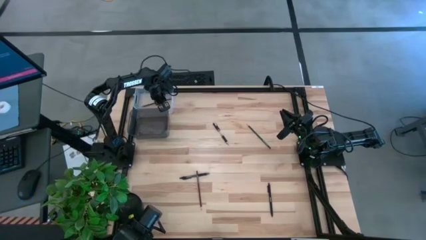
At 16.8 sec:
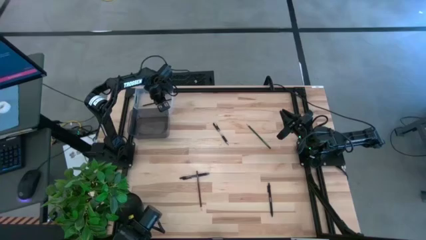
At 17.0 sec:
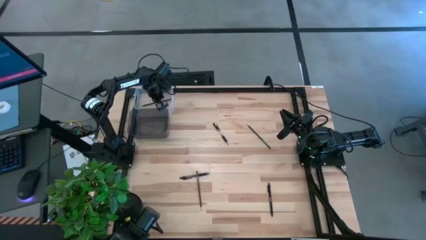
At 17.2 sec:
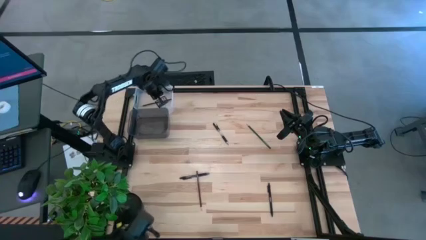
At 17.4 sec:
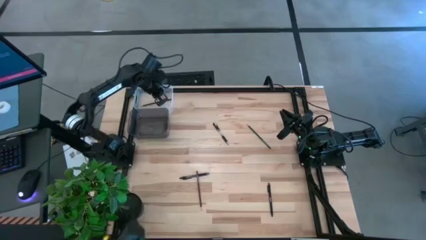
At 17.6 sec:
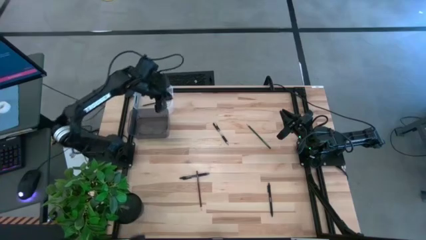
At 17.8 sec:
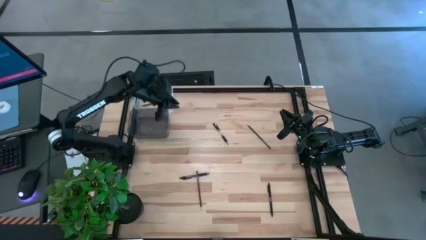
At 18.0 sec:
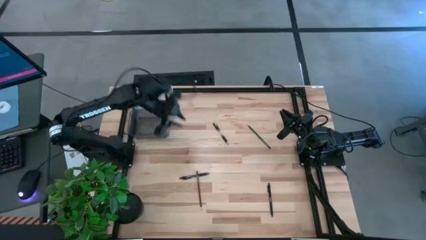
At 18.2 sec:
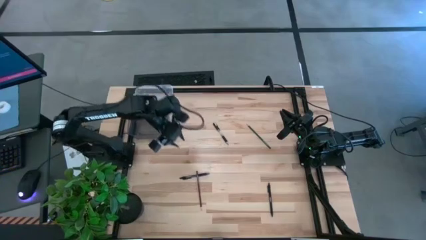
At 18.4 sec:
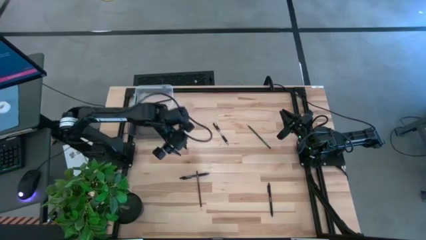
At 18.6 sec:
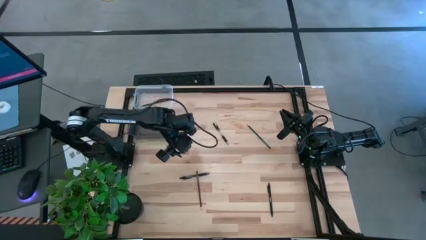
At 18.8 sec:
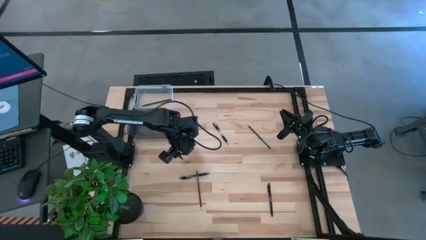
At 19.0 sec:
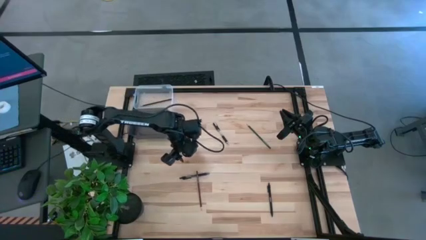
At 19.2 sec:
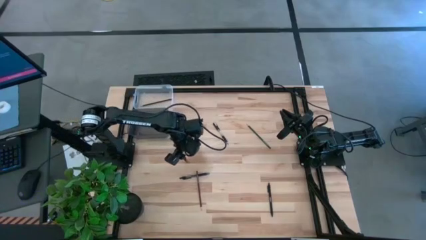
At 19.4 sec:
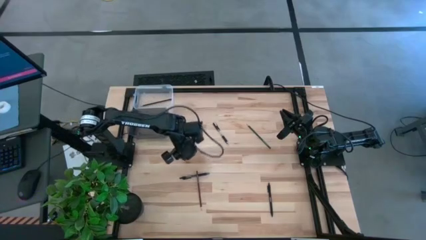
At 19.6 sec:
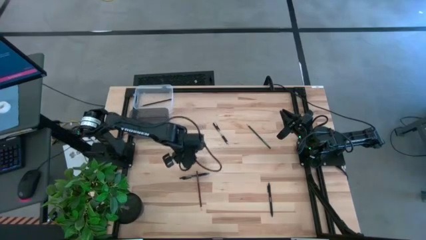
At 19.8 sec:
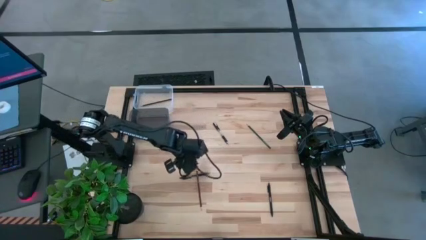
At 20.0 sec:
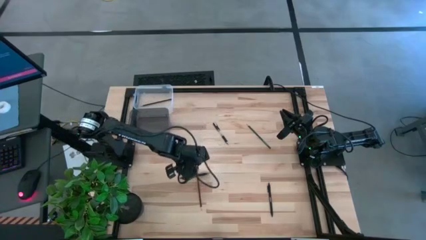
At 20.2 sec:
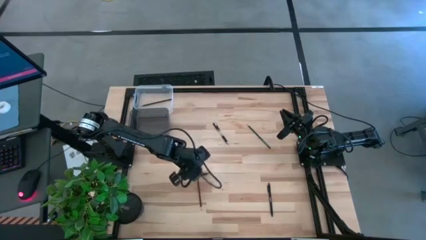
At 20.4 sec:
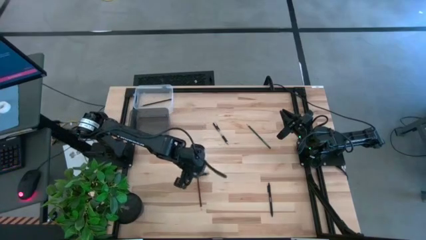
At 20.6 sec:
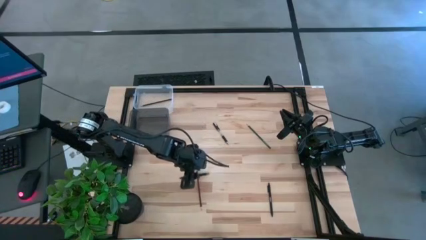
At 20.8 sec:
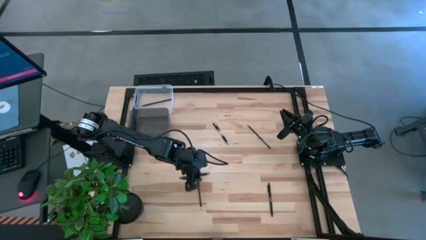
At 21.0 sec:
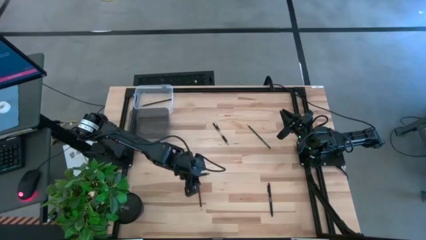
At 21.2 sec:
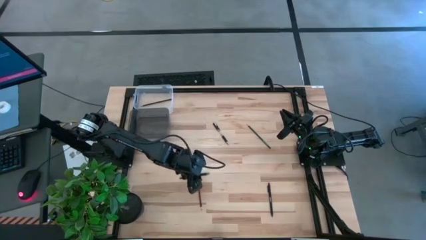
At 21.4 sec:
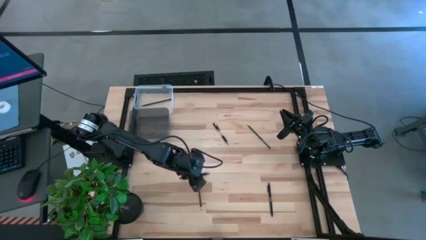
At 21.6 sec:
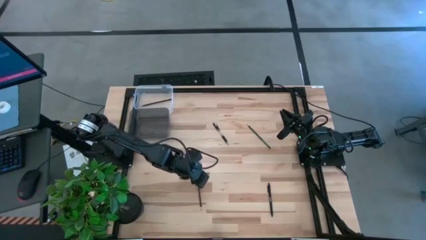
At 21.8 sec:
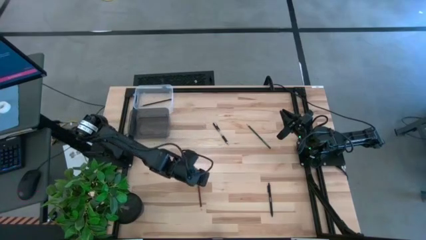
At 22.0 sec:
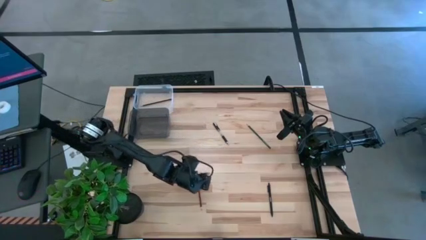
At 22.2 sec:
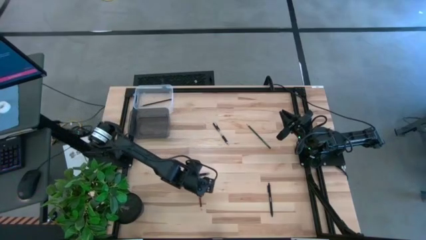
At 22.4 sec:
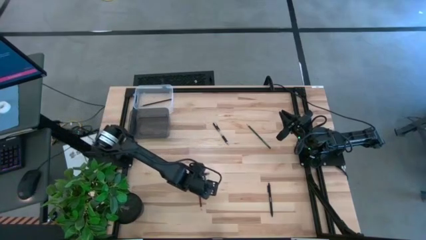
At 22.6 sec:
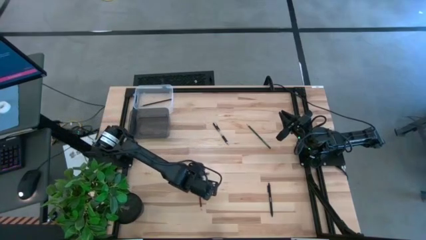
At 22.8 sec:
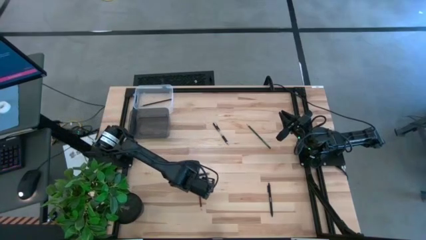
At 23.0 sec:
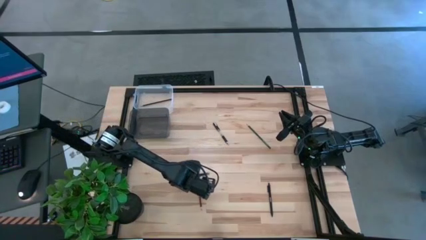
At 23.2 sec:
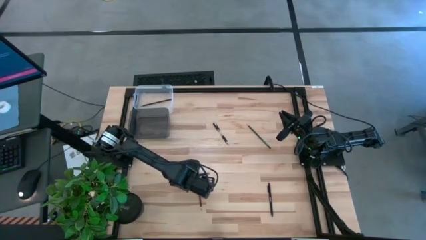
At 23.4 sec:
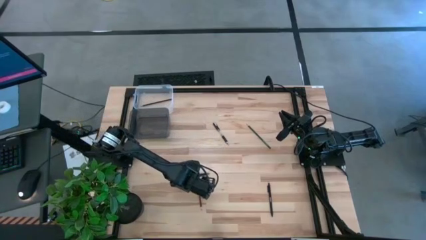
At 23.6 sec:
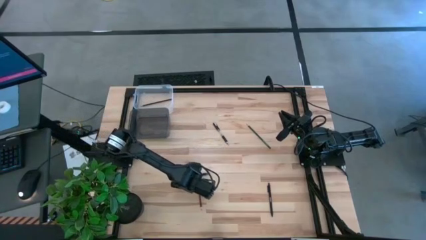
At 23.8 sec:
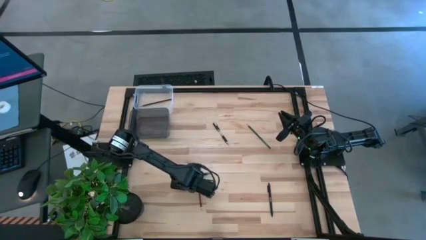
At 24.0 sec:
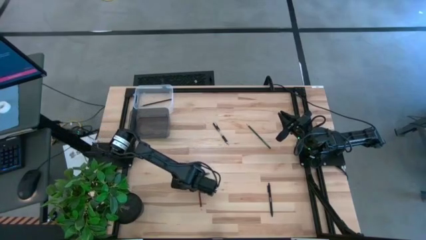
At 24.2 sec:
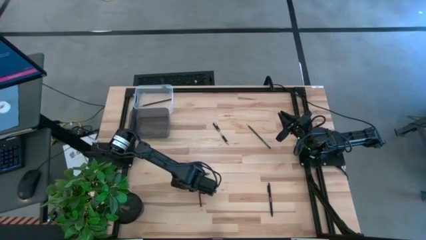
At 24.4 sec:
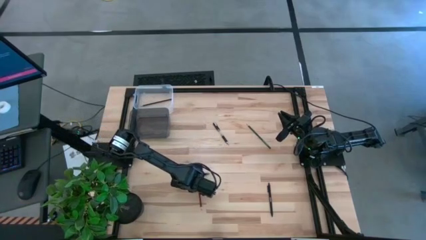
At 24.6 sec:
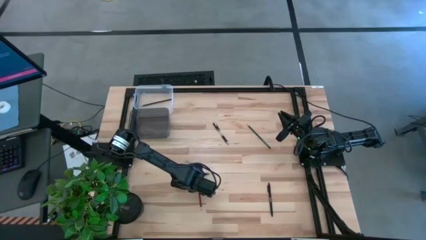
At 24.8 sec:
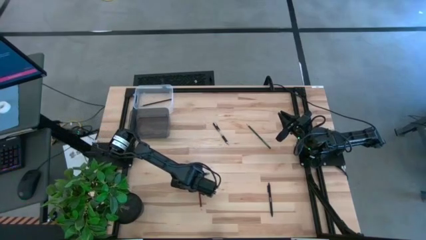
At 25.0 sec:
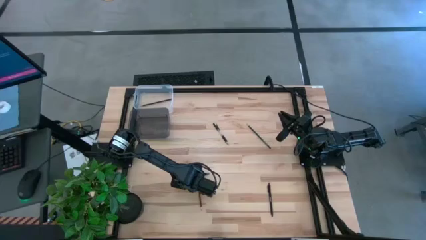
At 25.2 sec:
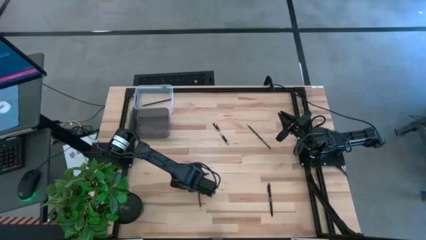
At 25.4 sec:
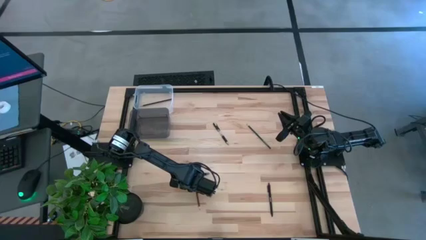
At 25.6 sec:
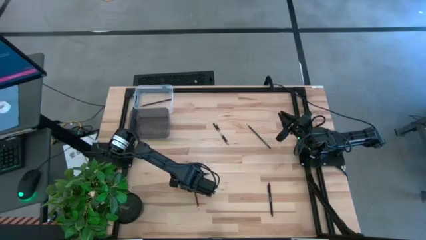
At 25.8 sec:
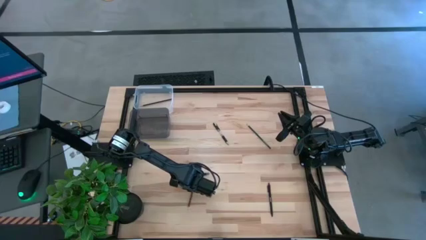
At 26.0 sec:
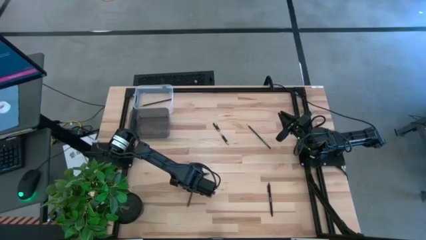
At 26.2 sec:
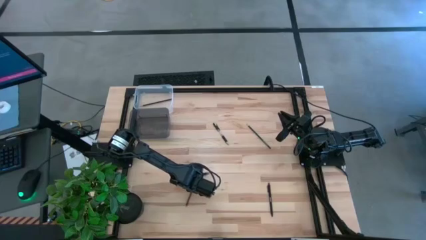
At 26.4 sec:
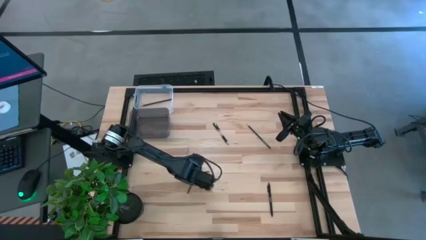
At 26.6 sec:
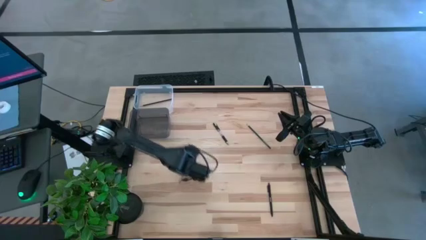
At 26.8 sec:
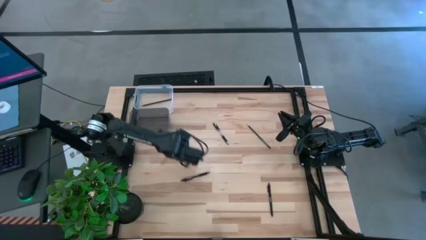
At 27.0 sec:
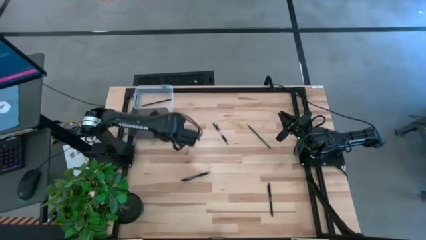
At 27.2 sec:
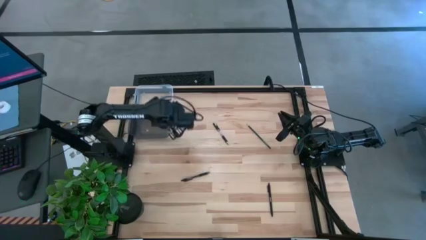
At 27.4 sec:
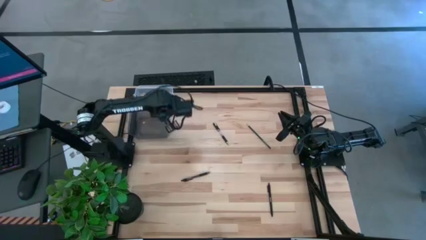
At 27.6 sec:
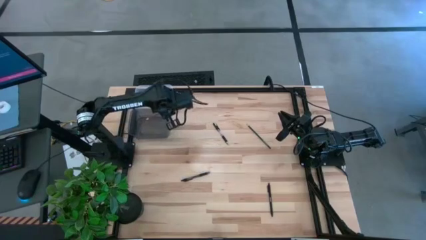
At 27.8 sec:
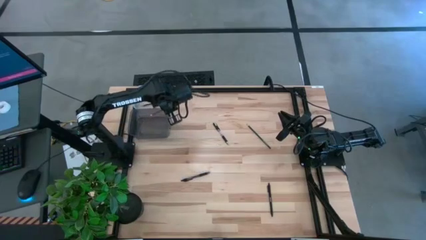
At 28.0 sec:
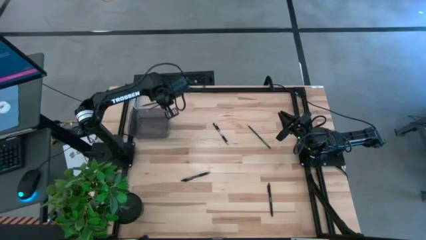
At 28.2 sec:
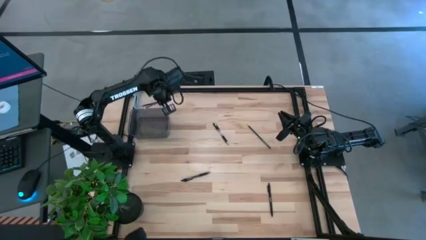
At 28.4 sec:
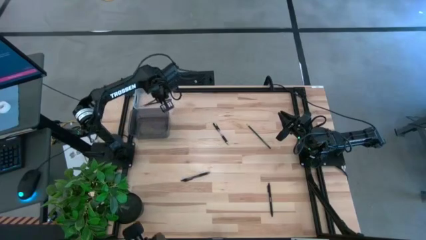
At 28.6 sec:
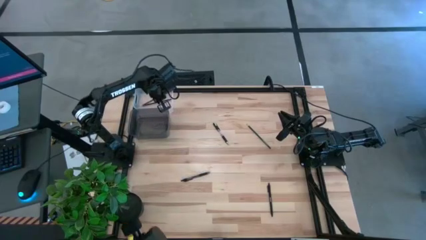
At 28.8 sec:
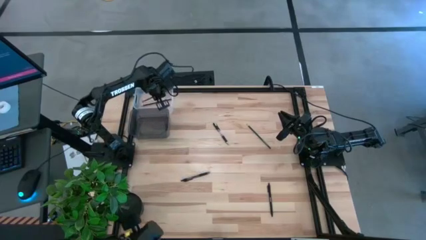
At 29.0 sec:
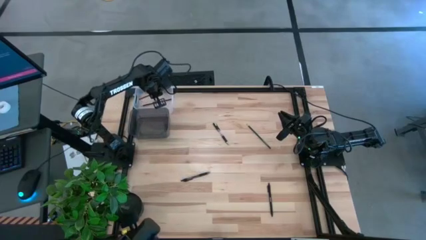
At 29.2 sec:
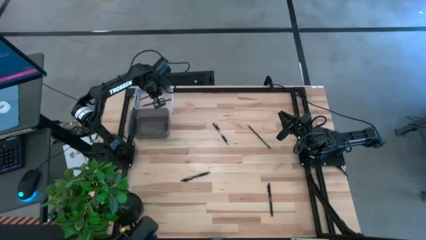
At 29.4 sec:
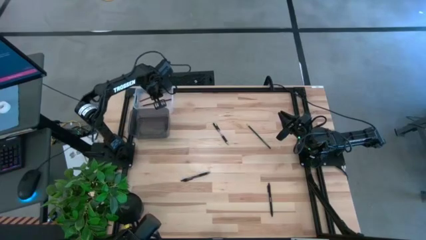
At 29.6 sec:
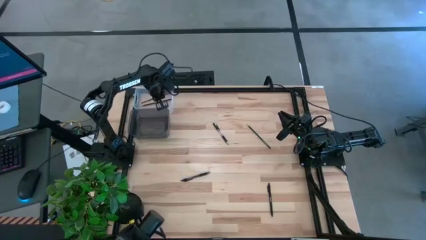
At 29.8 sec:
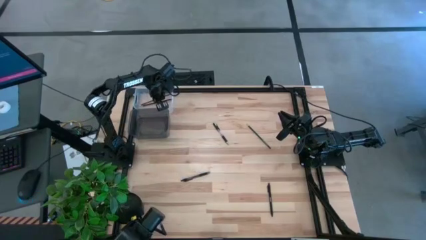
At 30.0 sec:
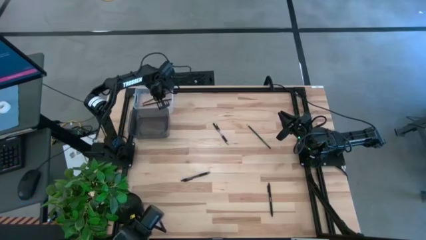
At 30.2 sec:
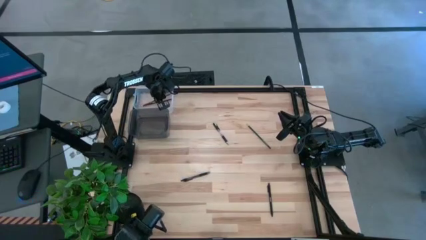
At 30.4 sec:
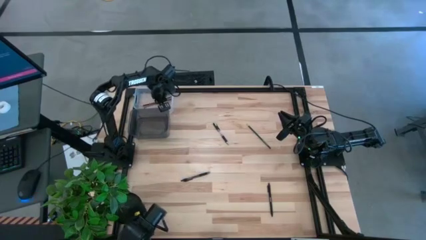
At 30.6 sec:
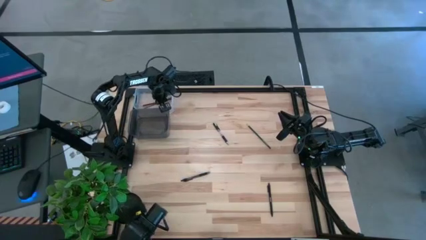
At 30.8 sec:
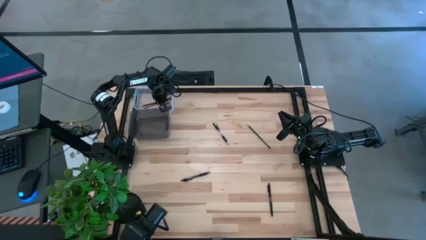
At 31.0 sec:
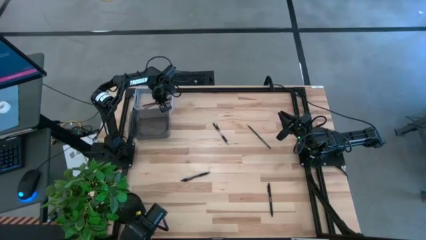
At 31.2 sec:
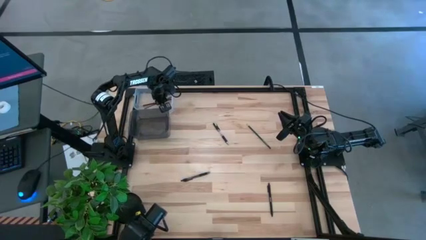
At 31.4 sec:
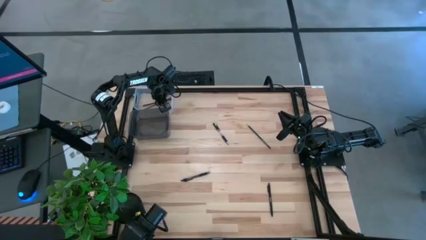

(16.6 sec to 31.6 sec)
Task: Sort pens & pencils
Put the brown pencil into the white bin
